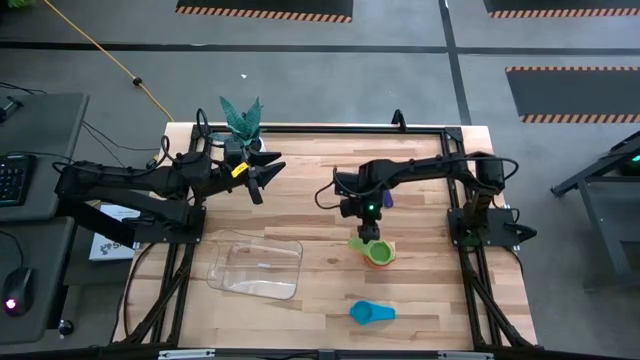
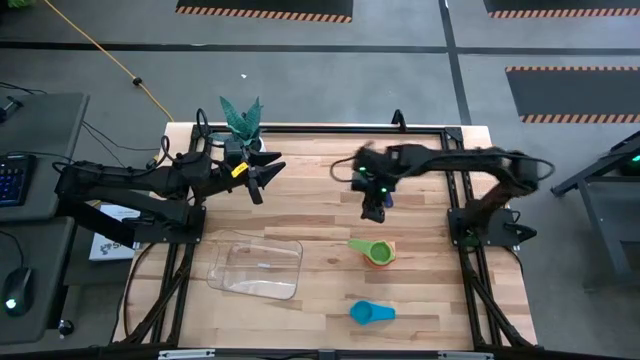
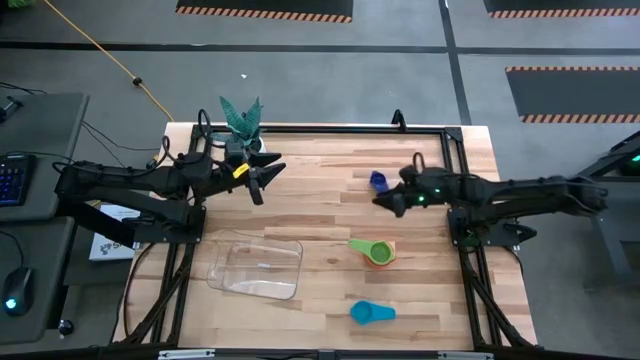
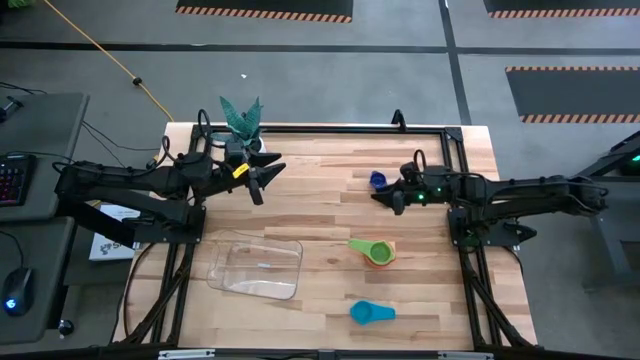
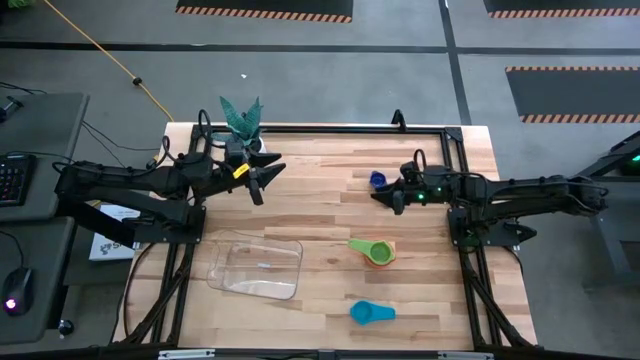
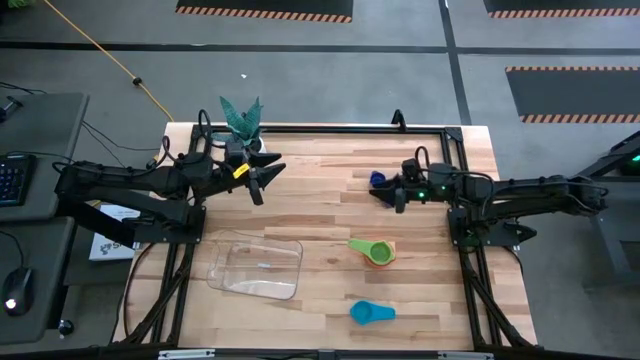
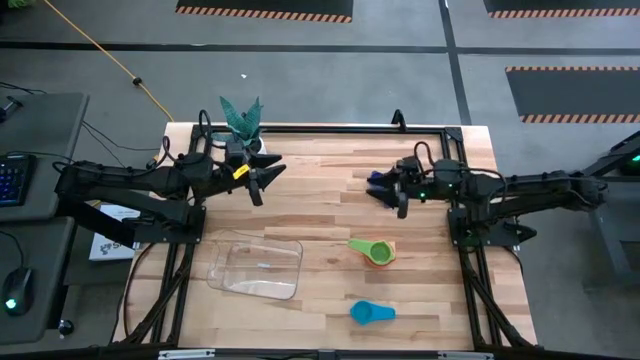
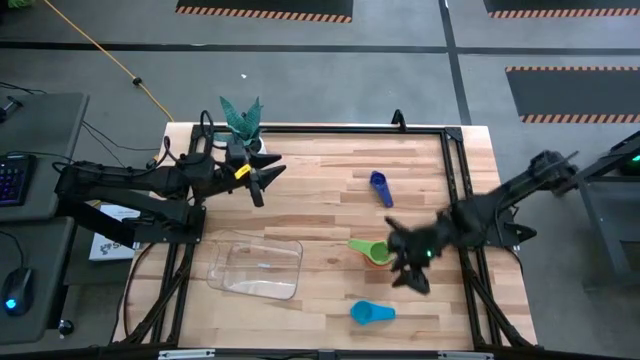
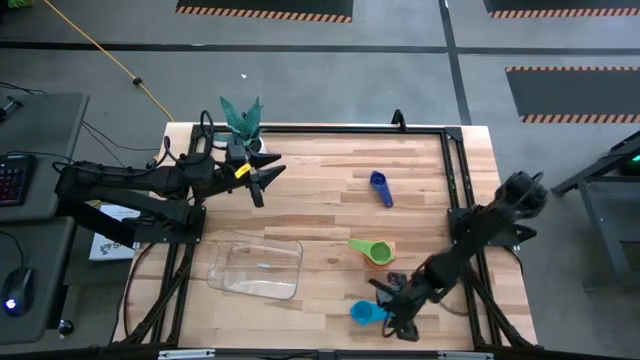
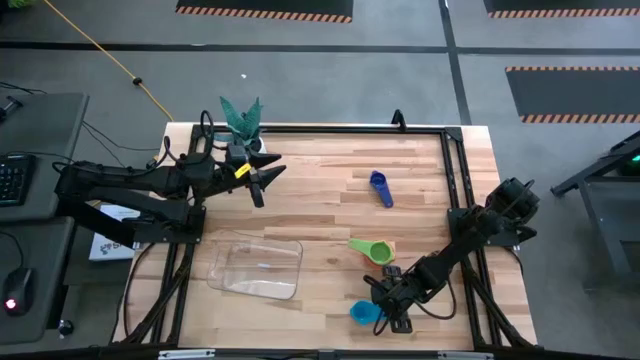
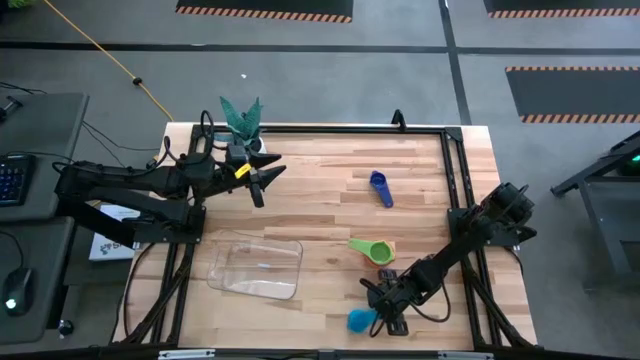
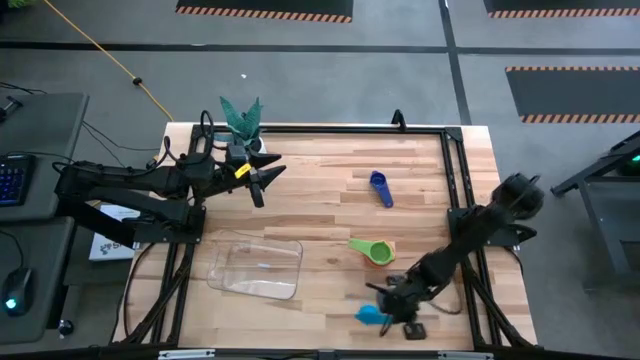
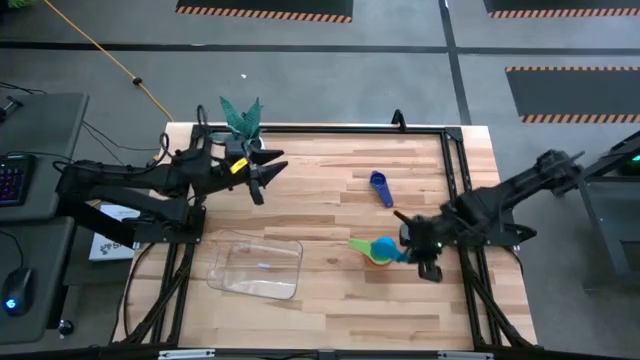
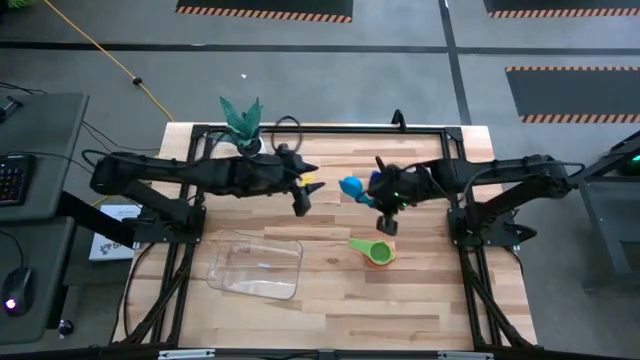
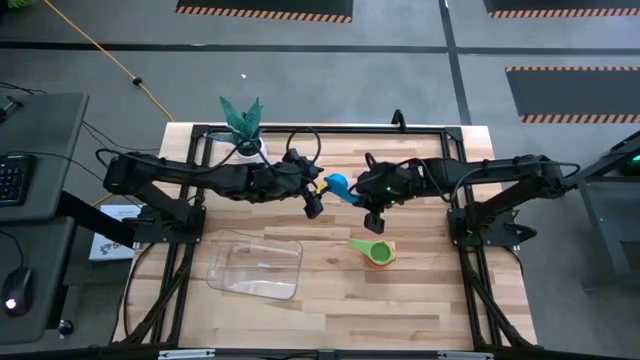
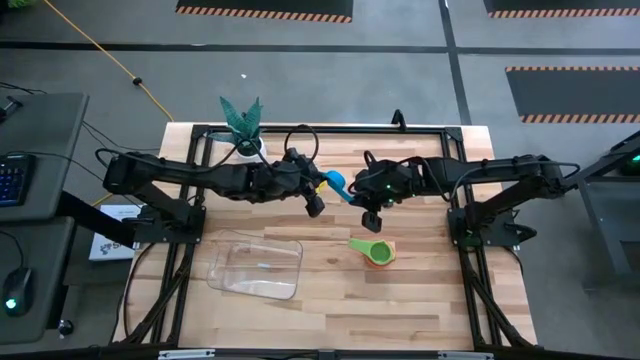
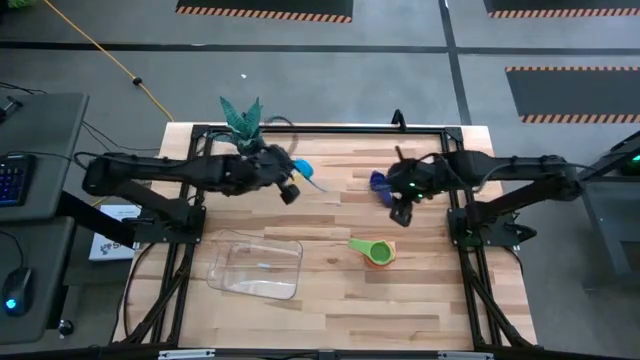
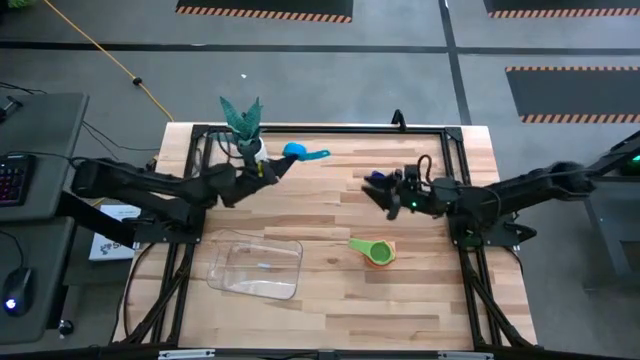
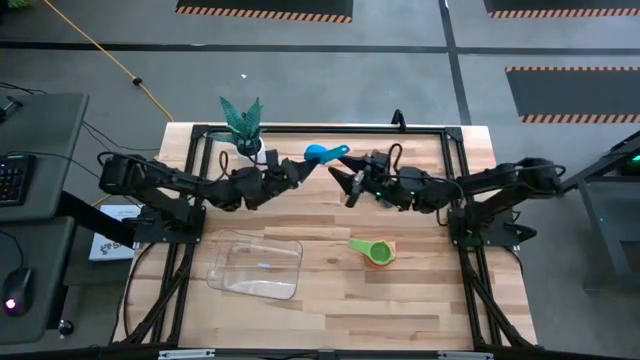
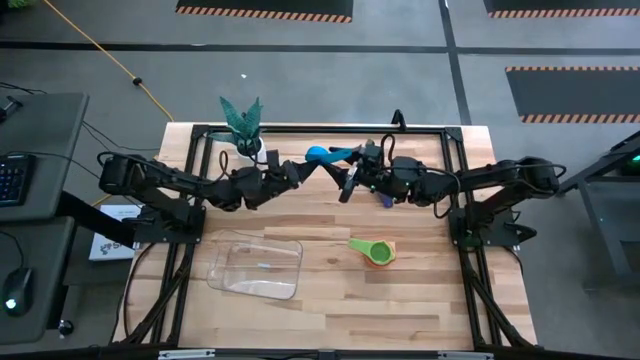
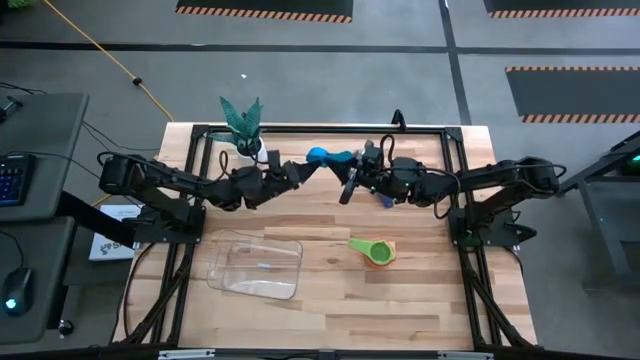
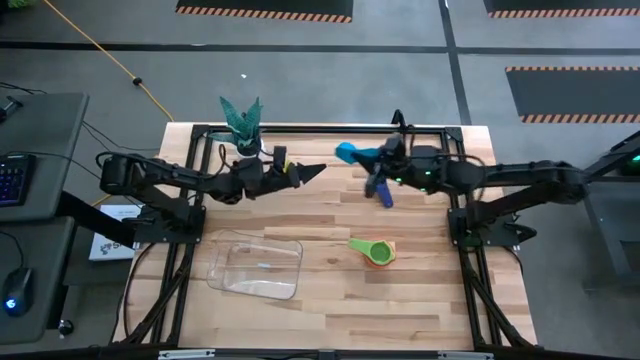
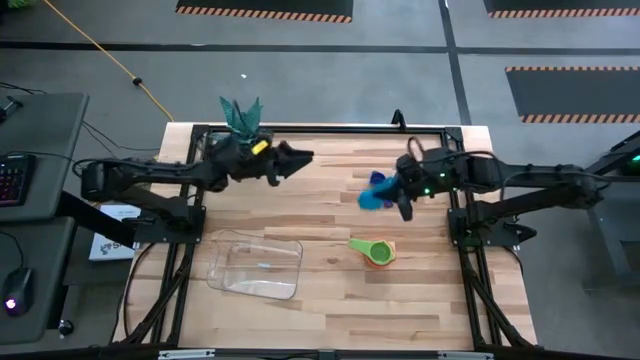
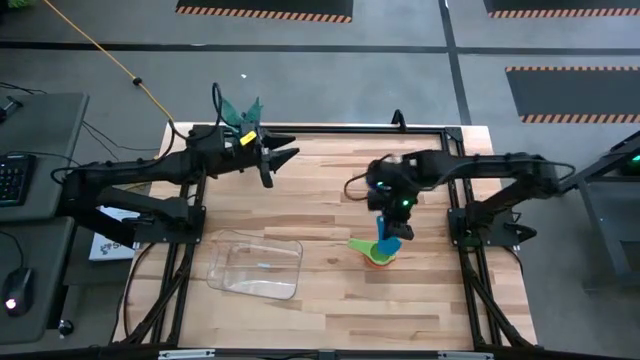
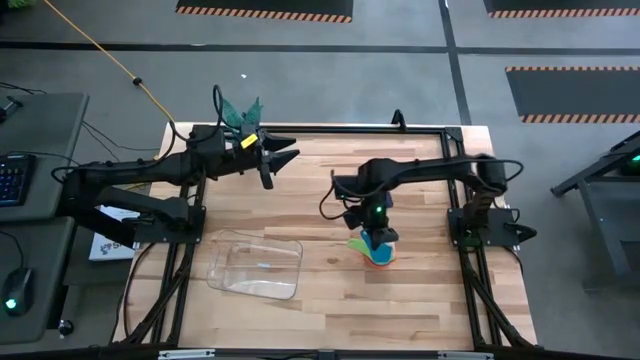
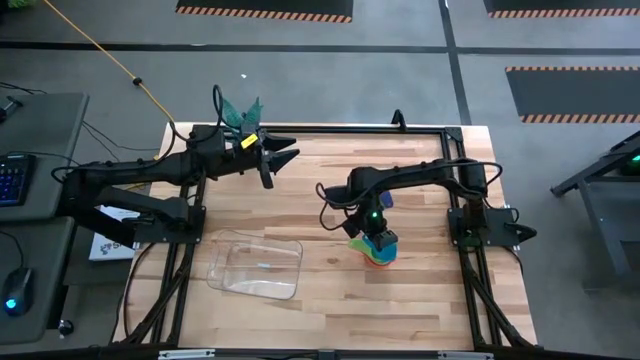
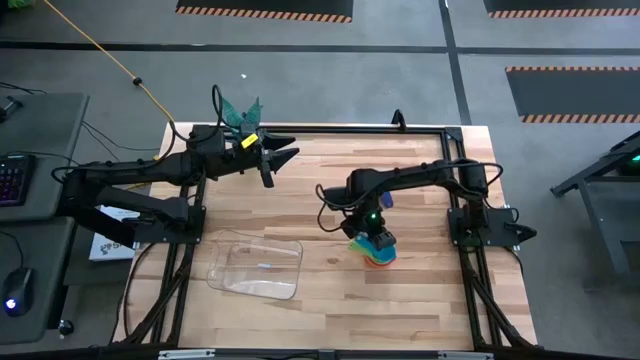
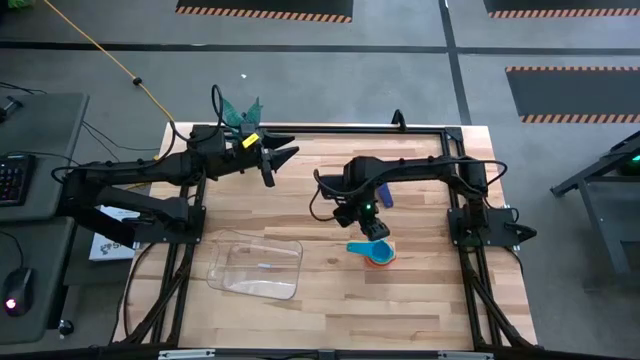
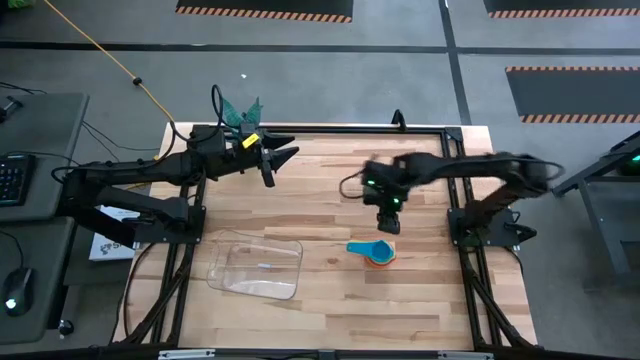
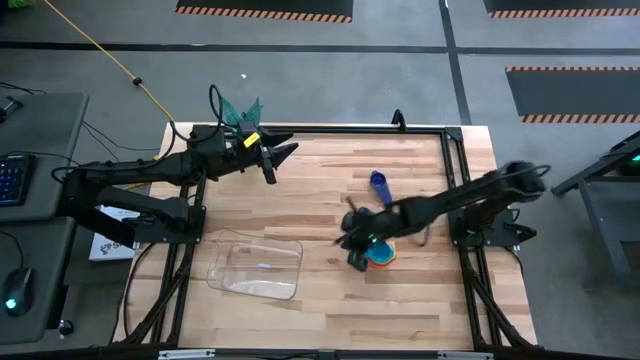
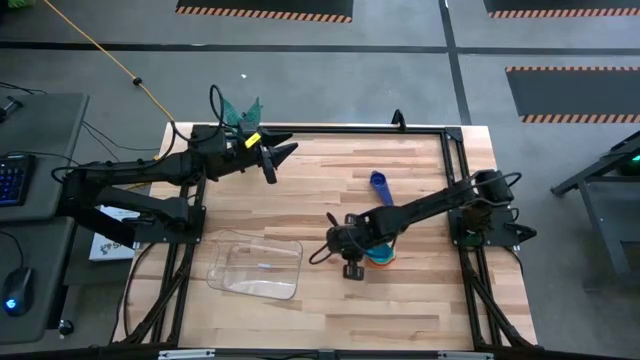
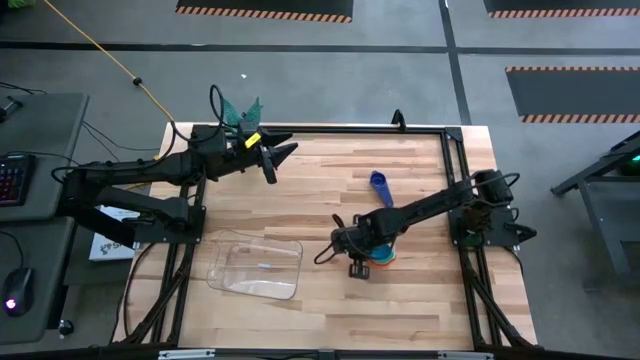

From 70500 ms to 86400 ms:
Task: Nest measuring cups in basket
Stack the light blue measuring cup on top of the green measuring cup

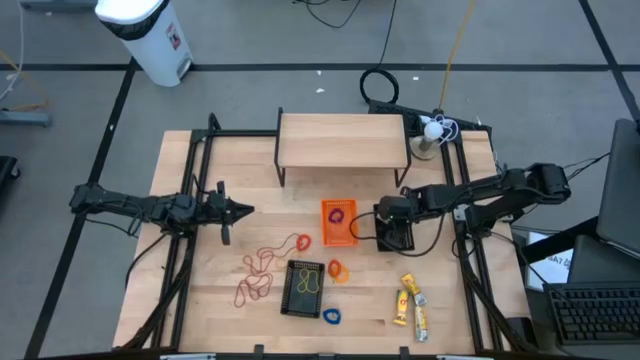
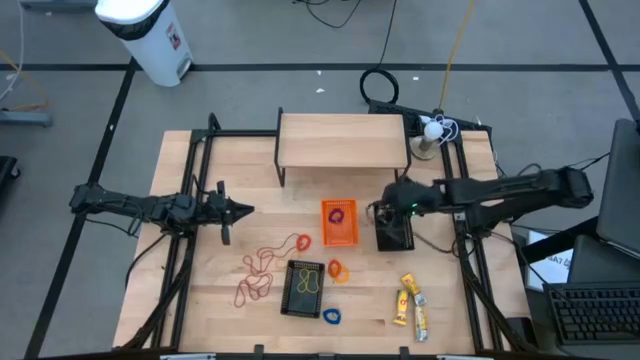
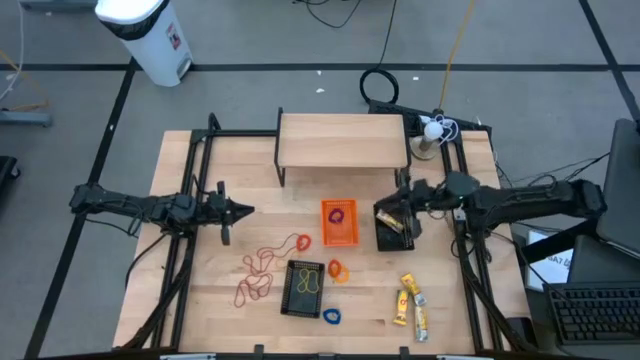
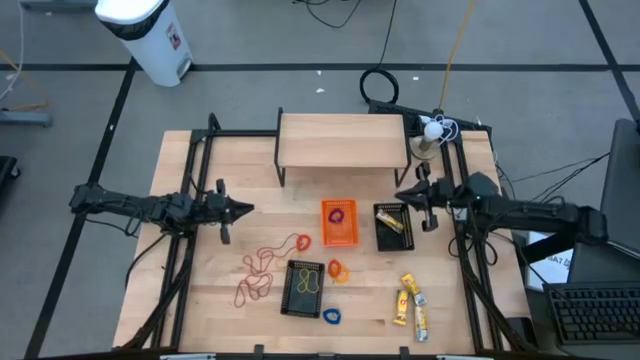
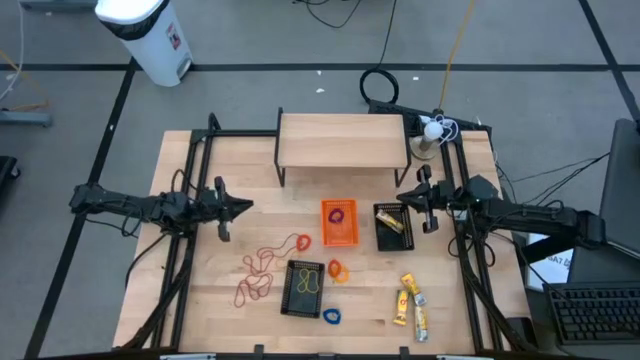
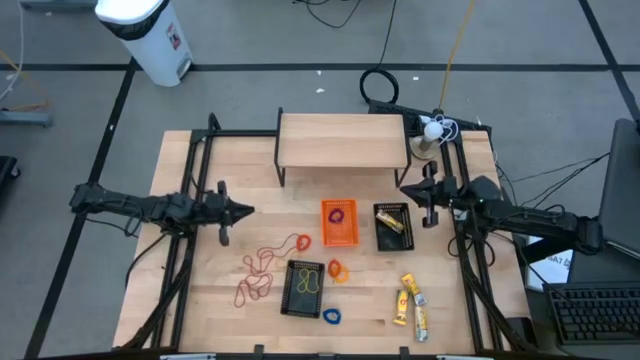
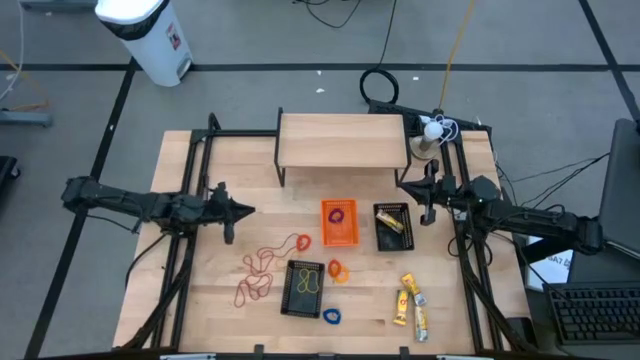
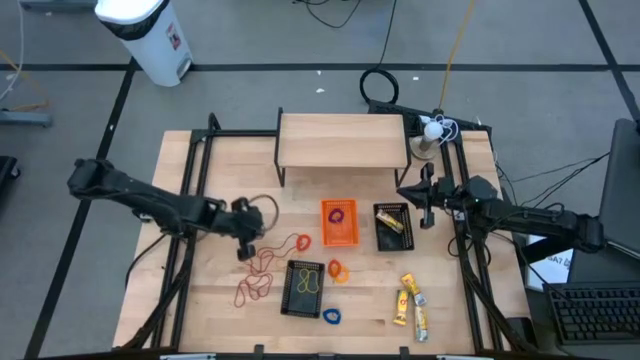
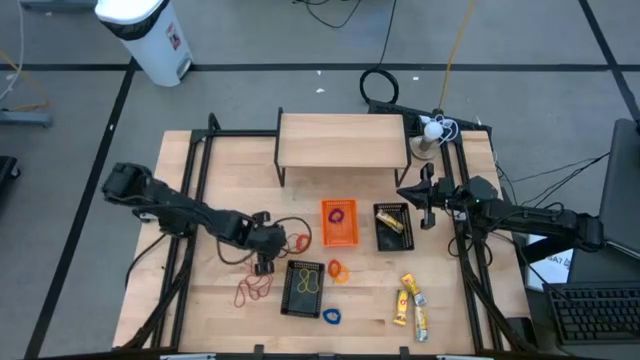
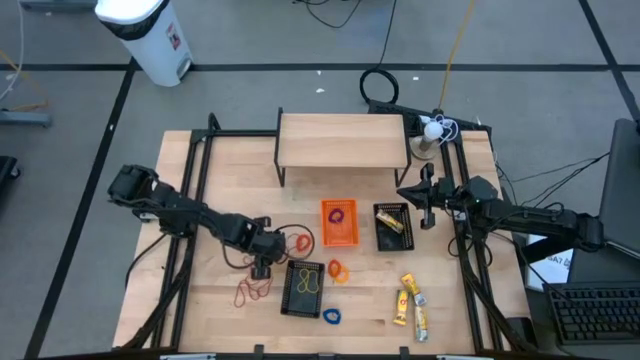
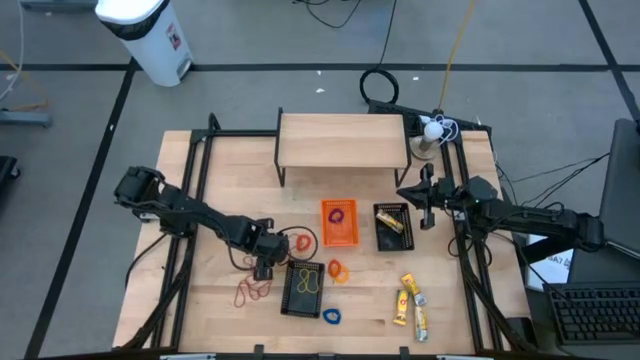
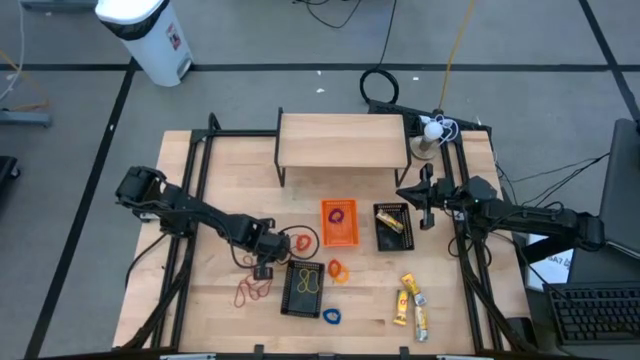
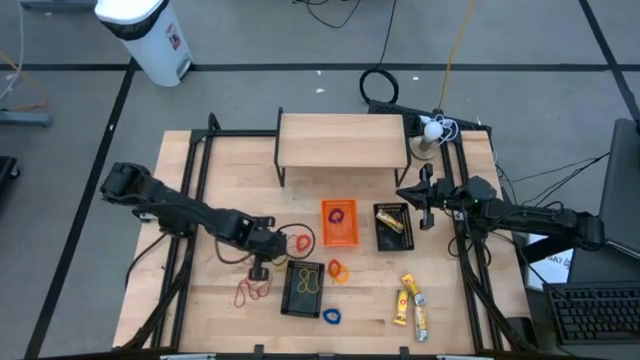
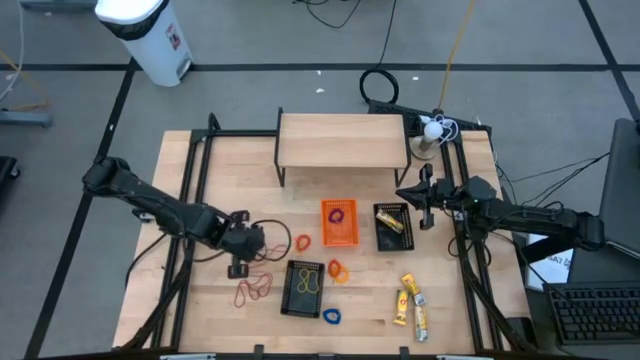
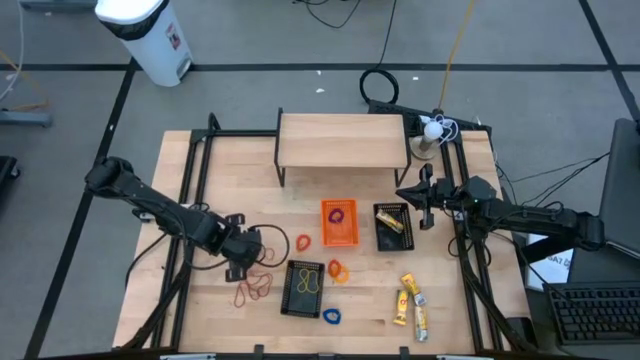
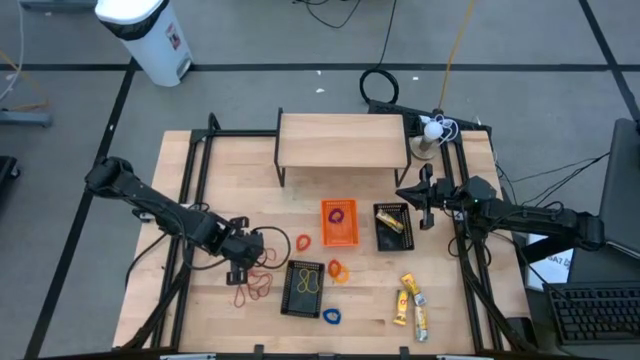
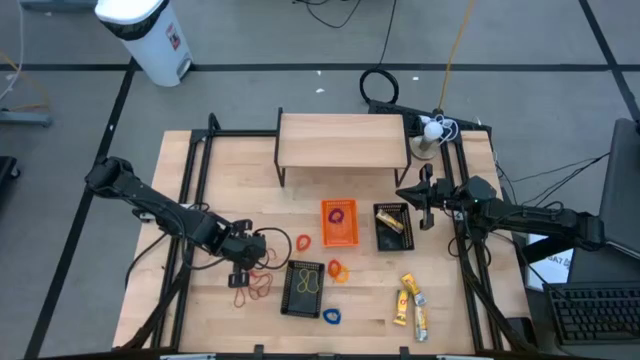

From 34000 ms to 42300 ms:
Task: Pick & Place Office Desk Supplies
Put the red rubber band into the bottom black bin
